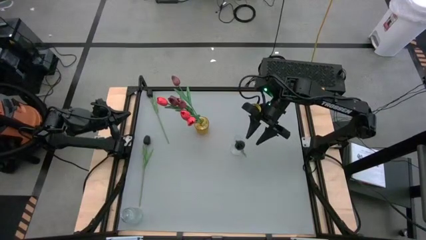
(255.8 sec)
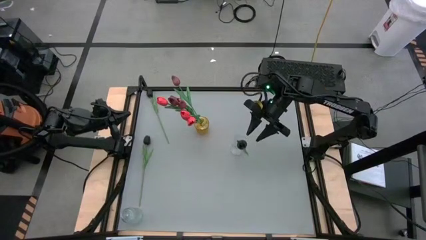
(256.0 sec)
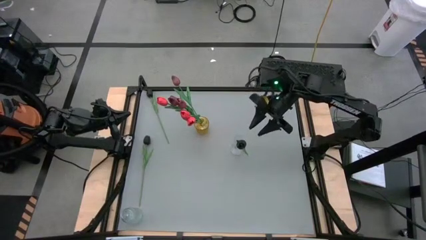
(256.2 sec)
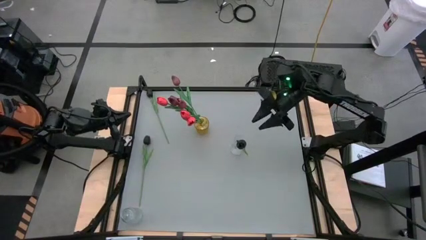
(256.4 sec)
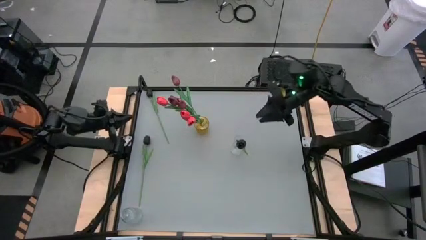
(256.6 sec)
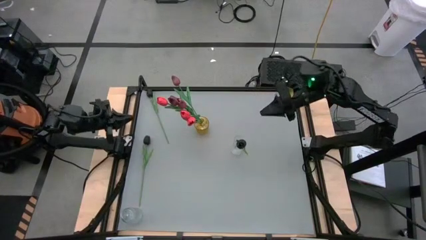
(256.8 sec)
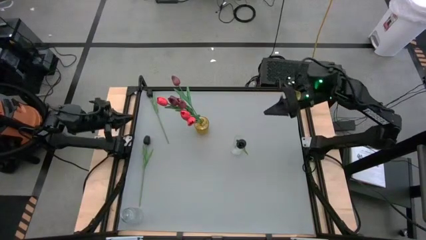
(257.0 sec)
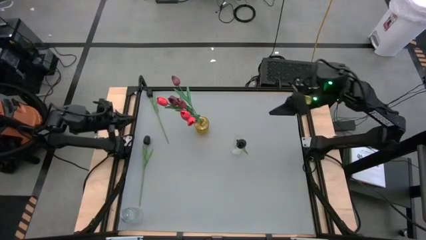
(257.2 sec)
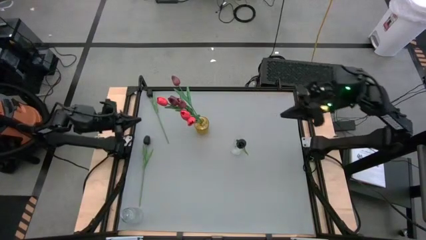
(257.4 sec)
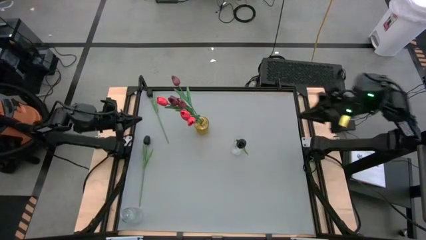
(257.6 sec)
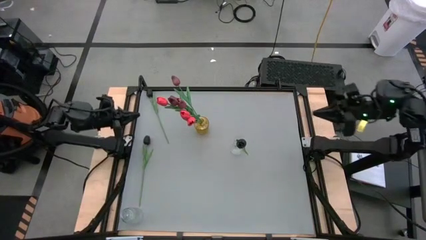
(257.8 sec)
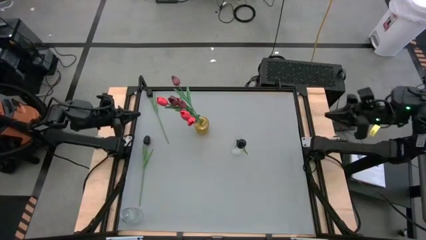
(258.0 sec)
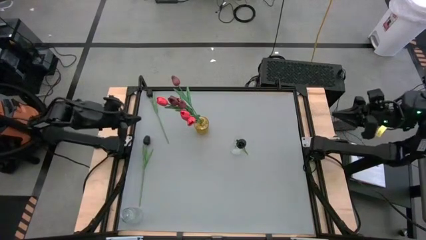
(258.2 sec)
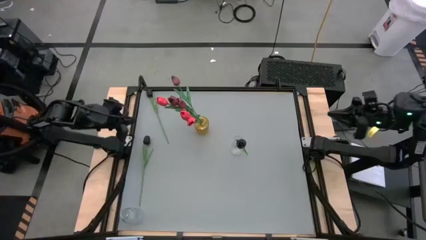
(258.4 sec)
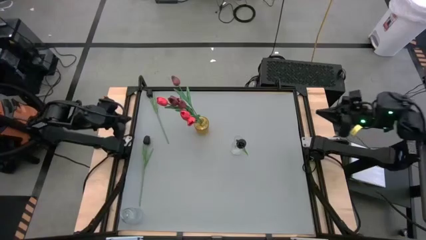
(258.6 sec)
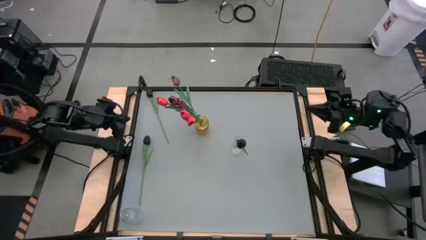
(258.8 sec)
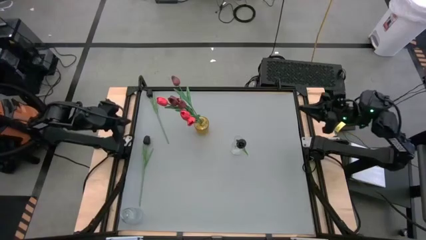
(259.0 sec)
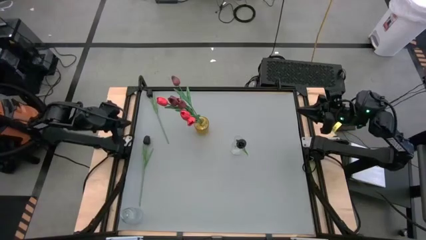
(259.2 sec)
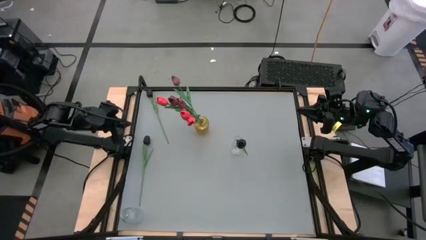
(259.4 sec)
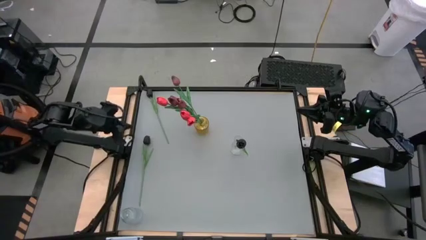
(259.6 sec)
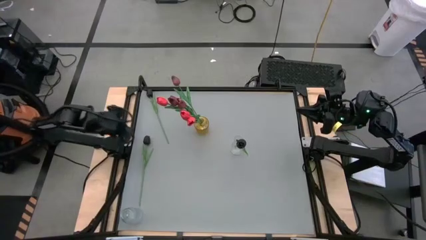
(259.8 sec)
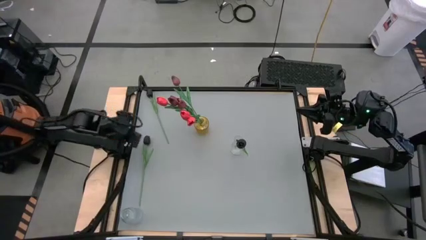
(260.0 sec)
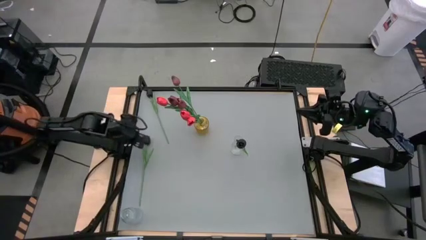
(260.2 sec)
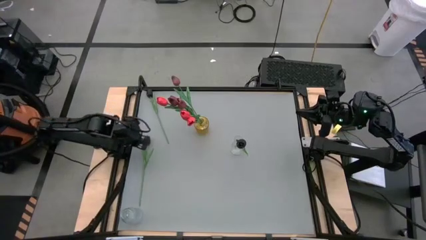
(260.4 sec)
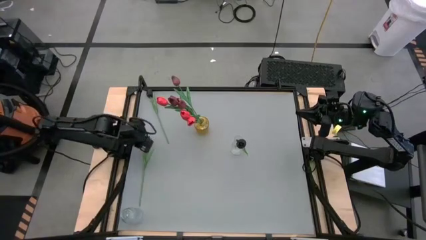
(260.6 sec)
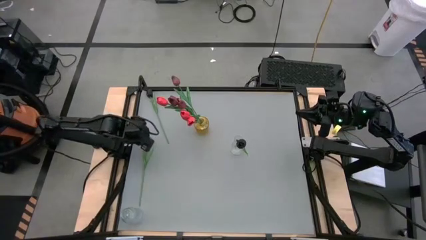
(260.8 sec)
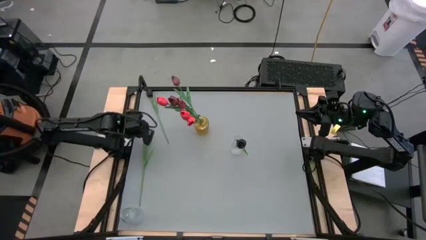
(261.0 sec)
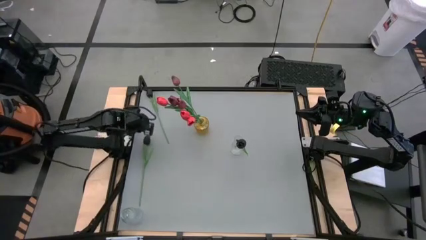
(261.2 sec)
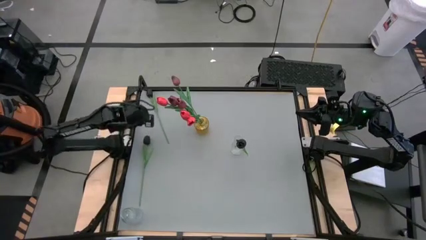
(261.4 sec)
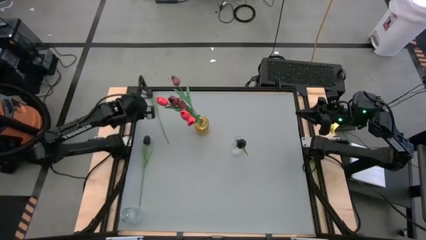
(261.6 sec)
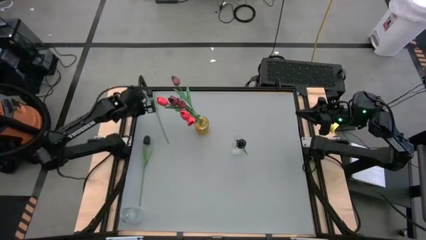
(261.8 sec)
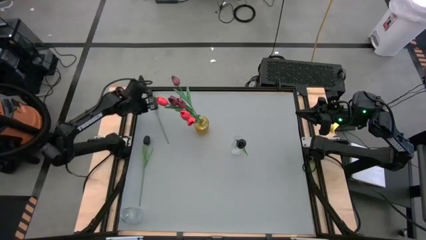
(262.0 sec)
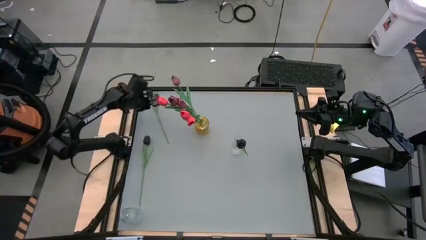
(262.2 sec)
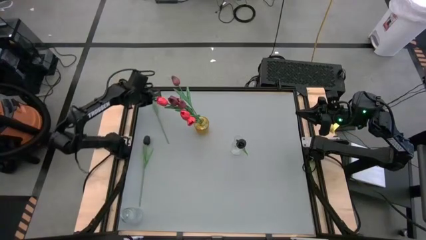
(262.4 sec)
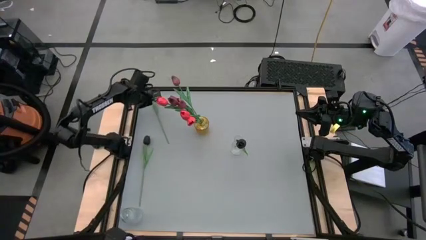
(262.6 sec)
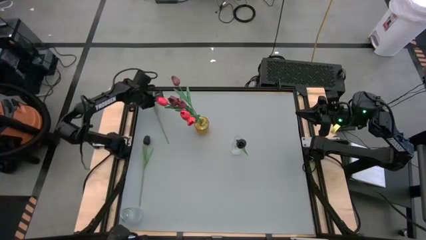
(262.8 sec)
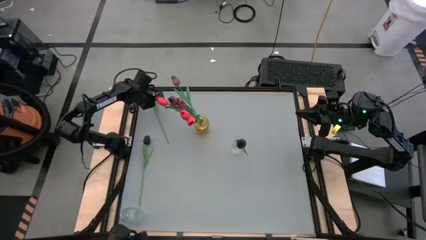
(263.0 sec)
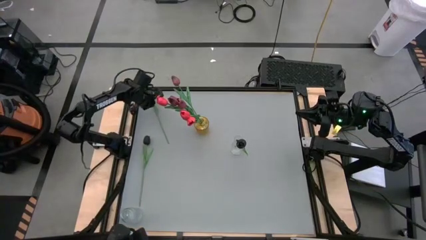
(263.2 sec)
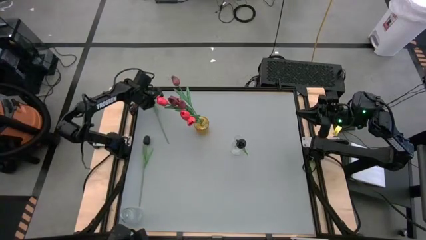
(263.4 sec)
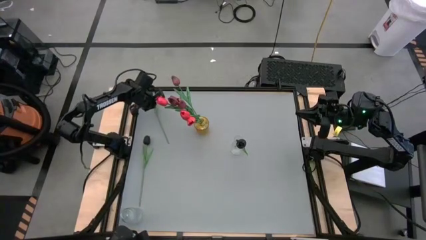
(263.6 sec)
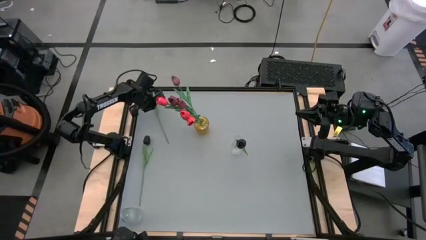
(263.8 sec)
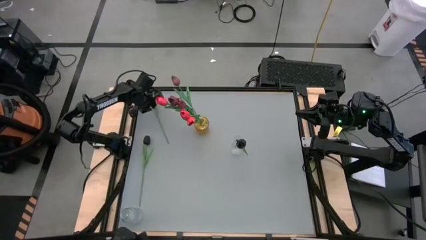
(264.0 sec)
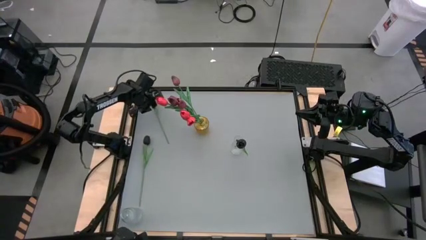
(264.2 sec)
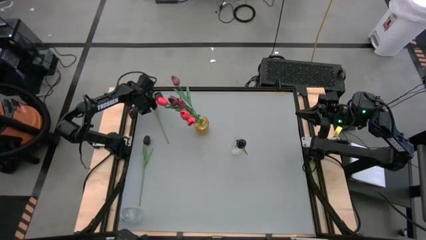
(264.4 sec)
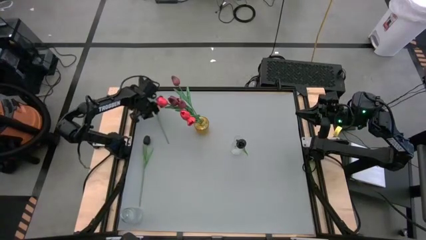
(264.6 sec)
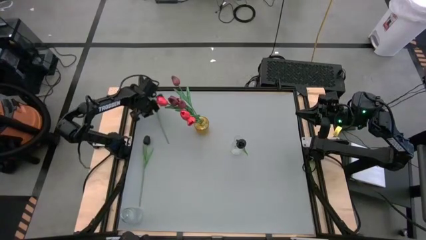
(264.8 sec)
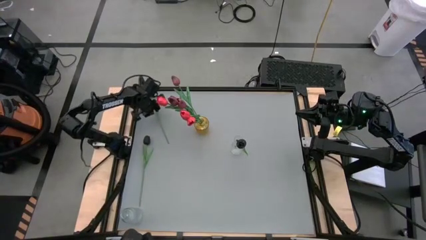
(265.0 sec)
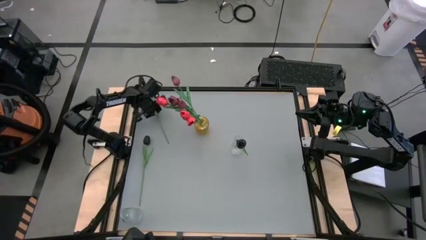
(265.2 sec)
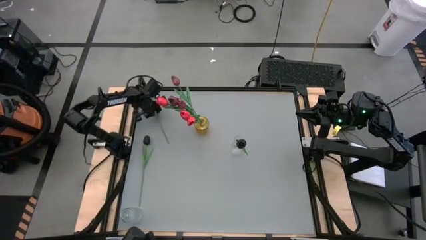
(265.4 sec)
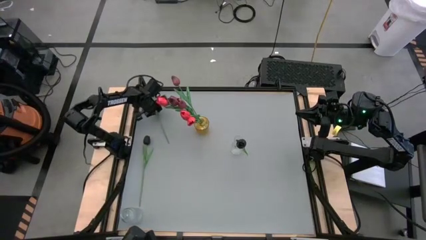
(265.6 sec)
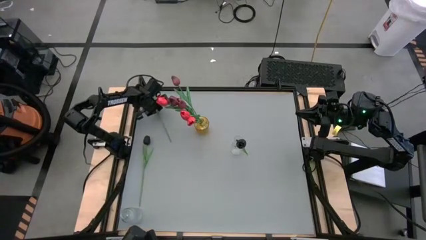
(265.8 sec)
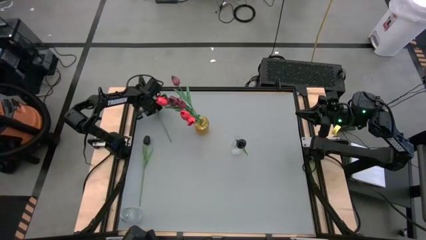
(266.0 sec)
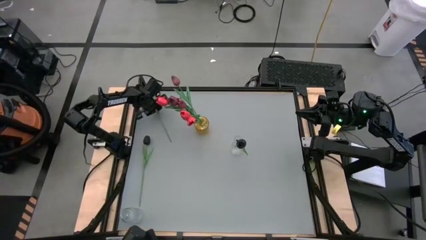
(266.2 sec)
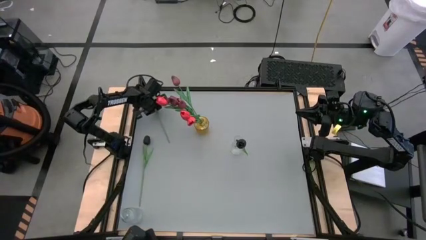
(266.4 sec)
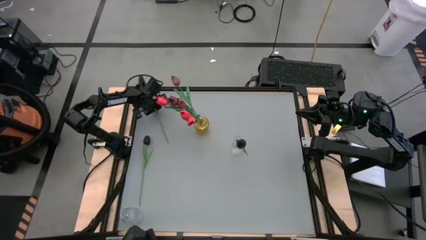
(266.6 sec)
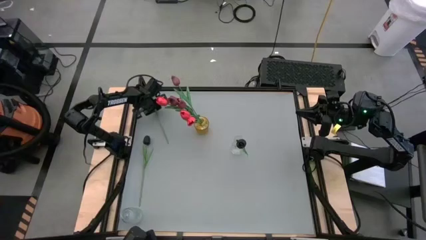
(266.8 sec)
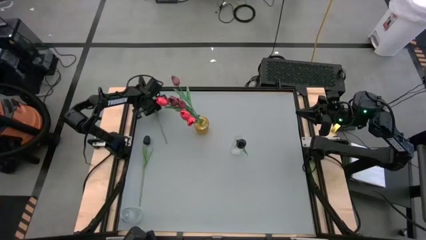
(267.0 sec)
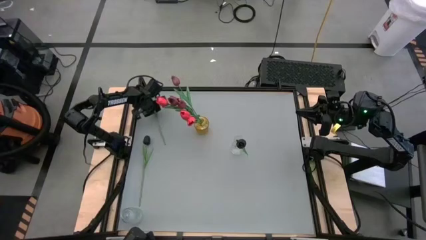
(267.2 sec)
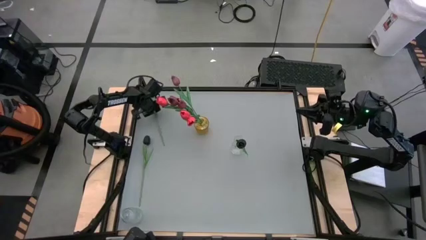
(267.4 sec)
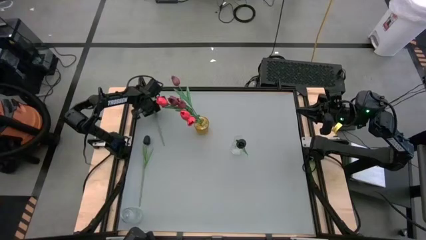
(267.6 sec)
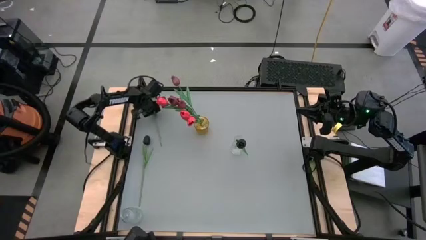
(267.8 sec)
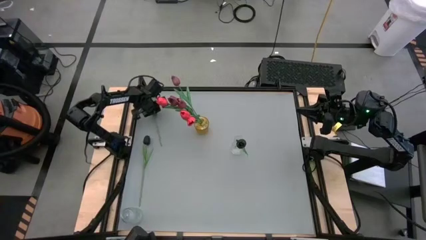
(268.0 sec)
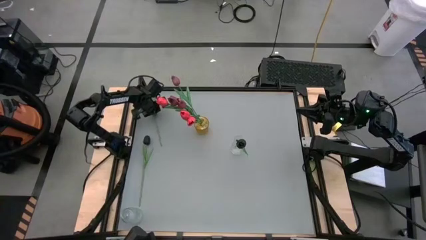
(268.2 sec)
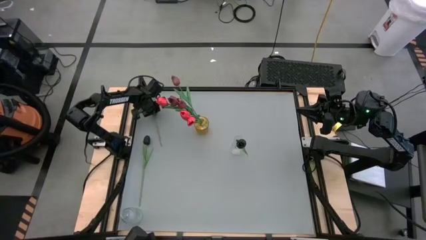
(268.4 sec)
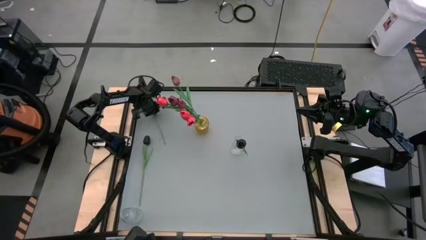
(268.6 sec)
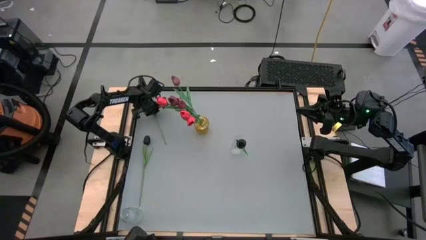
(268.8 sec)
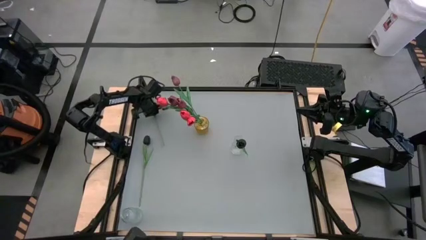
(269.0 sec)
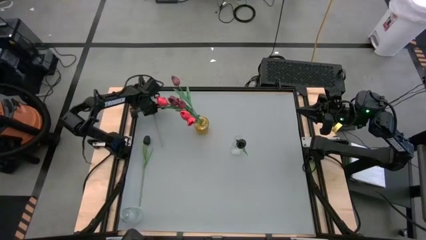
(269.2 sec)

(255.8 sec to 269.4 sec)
Task: Sort flowers into vase by color
Put the top black flower into the transparent vase
